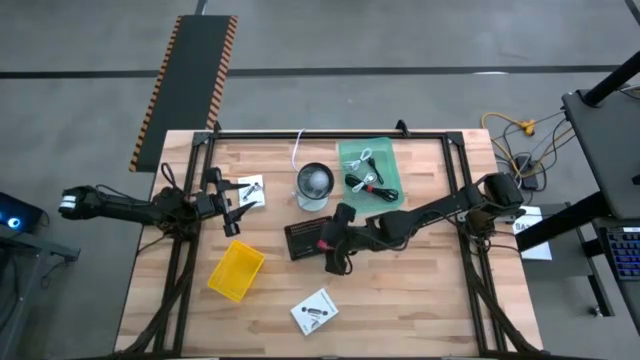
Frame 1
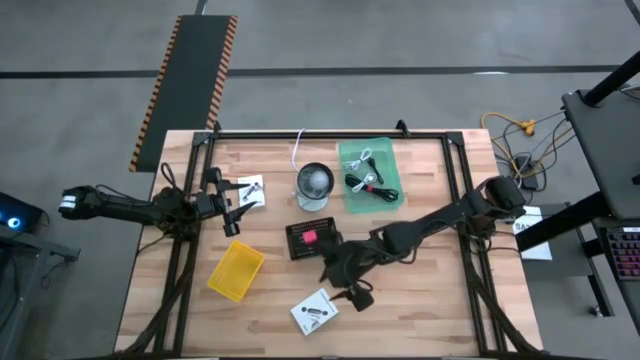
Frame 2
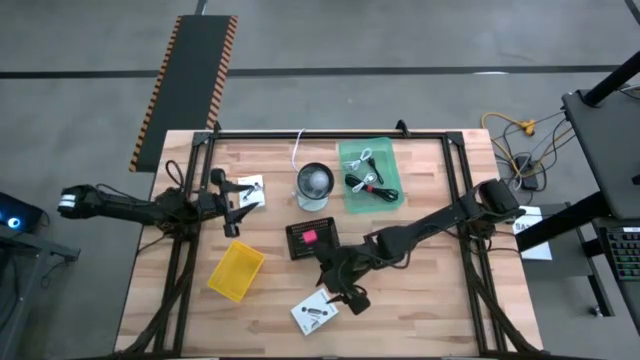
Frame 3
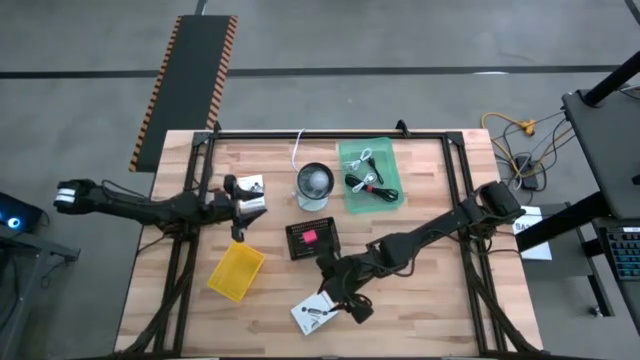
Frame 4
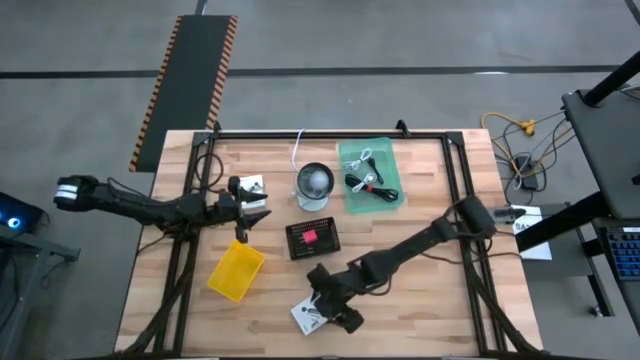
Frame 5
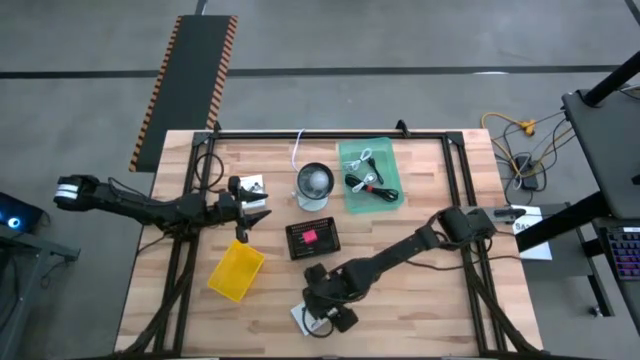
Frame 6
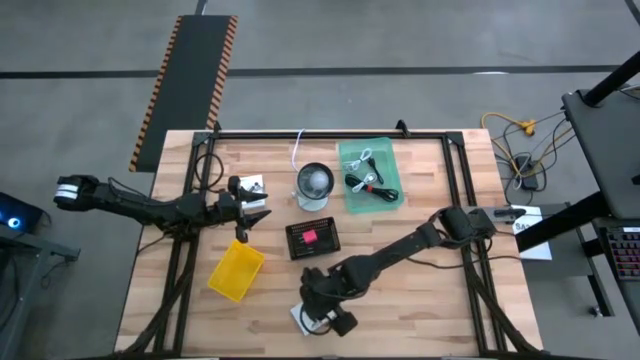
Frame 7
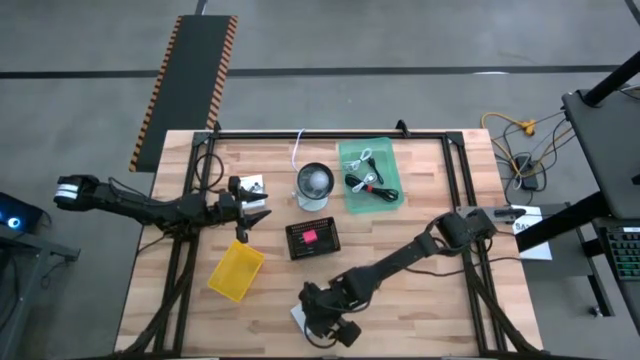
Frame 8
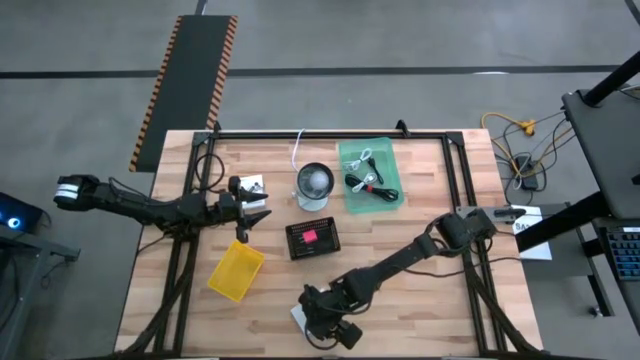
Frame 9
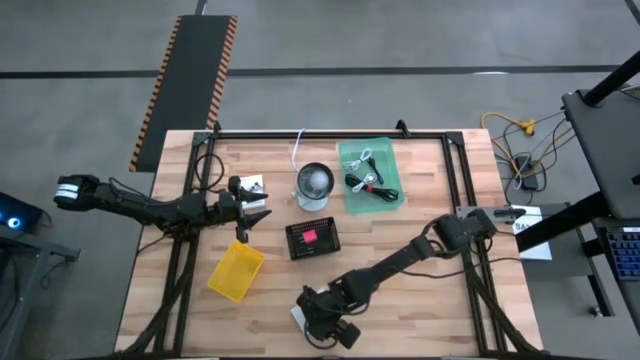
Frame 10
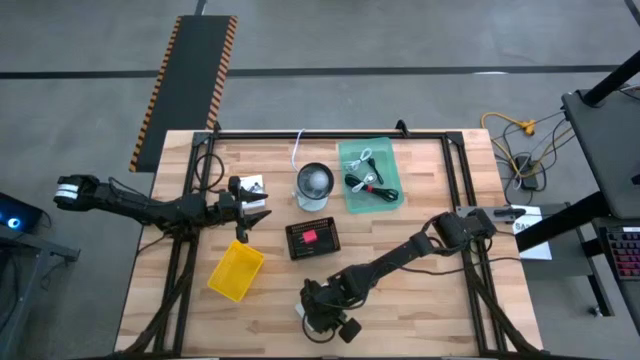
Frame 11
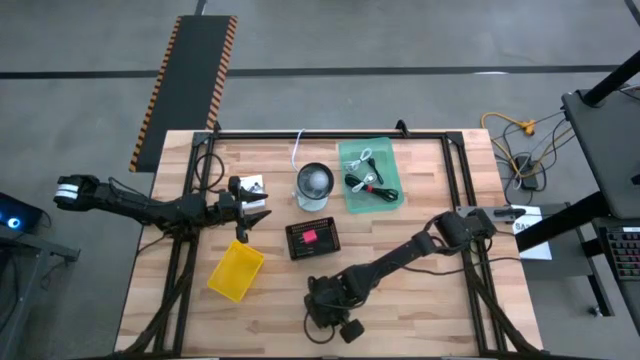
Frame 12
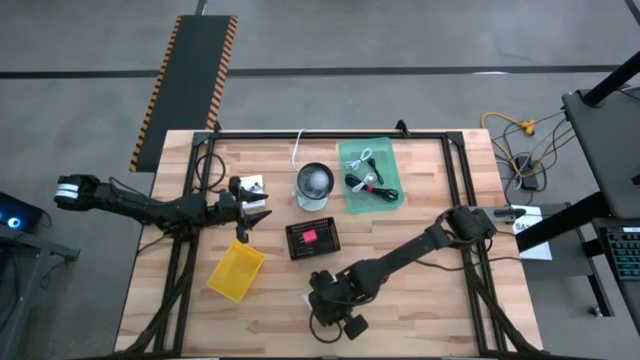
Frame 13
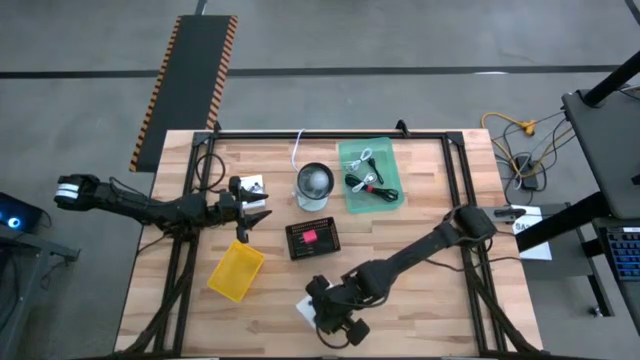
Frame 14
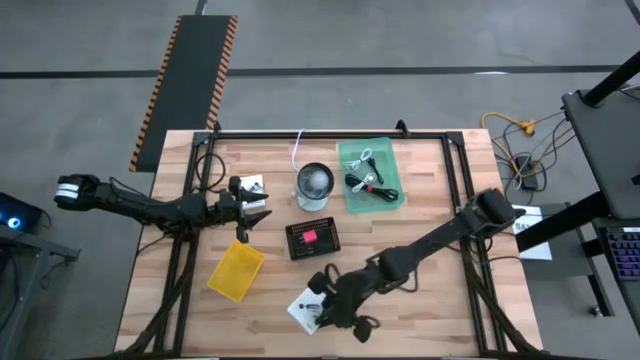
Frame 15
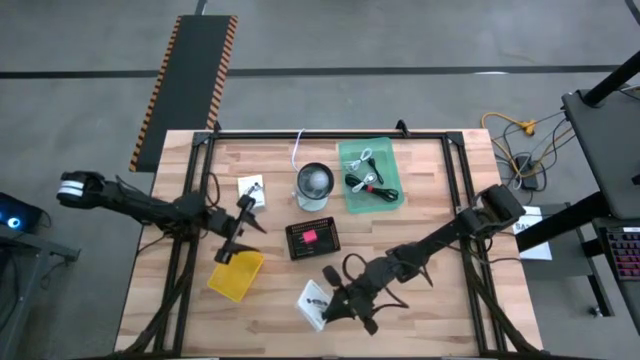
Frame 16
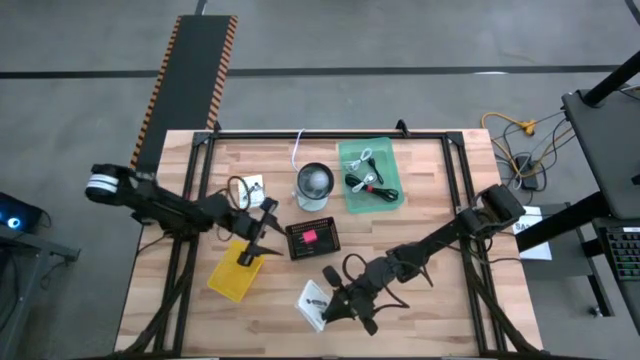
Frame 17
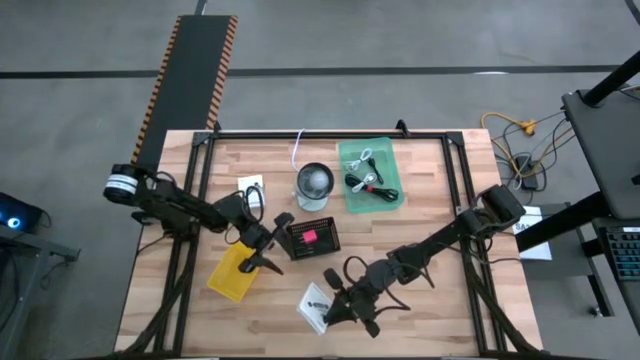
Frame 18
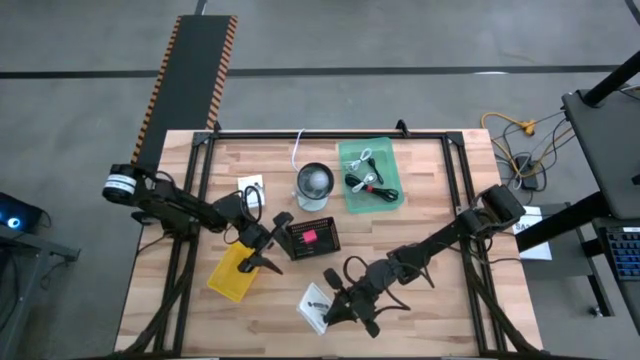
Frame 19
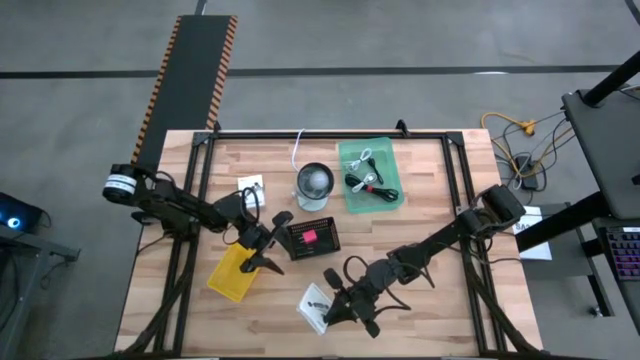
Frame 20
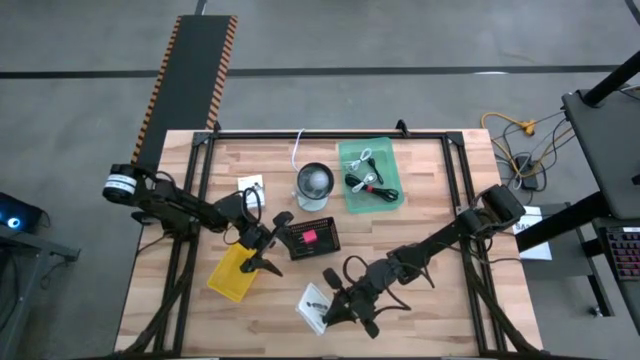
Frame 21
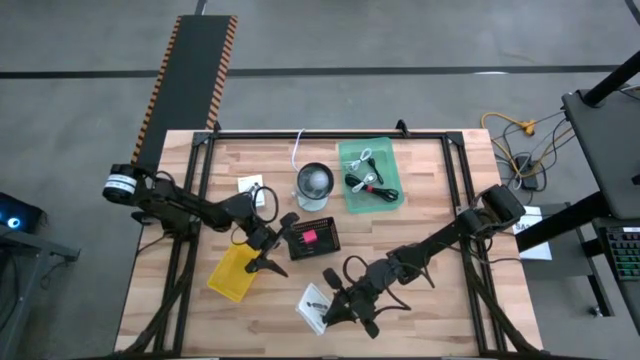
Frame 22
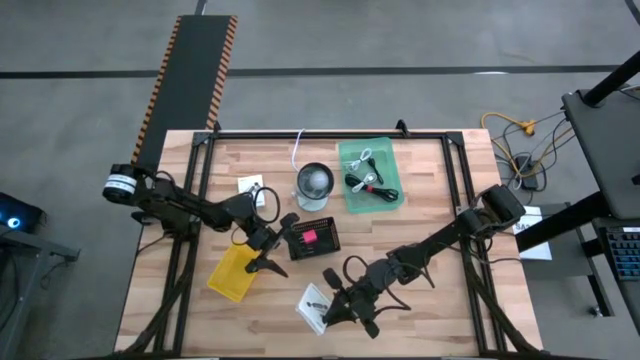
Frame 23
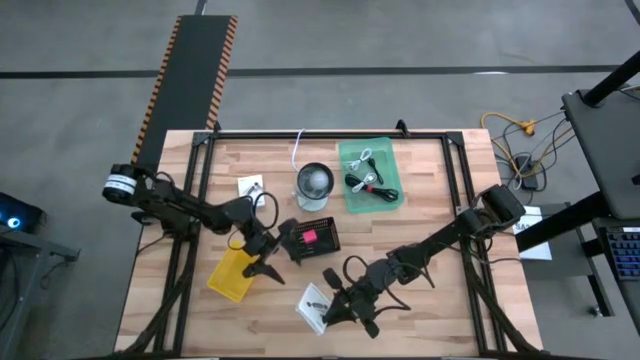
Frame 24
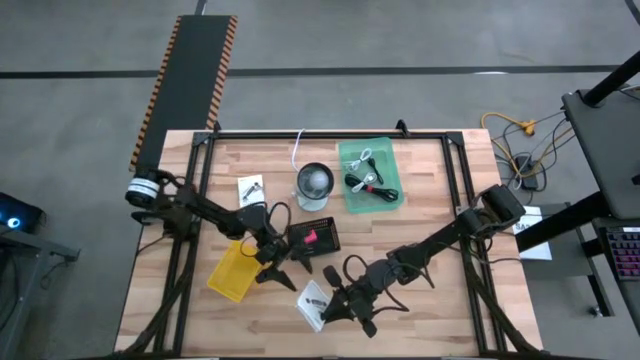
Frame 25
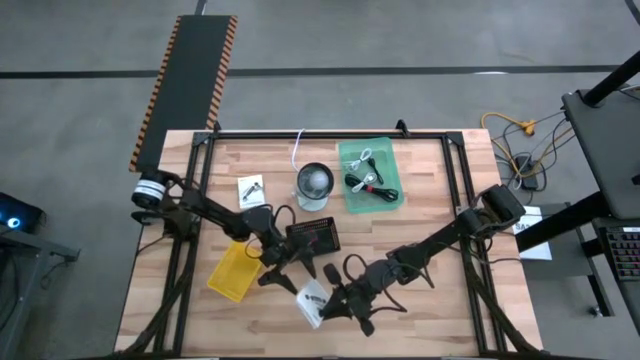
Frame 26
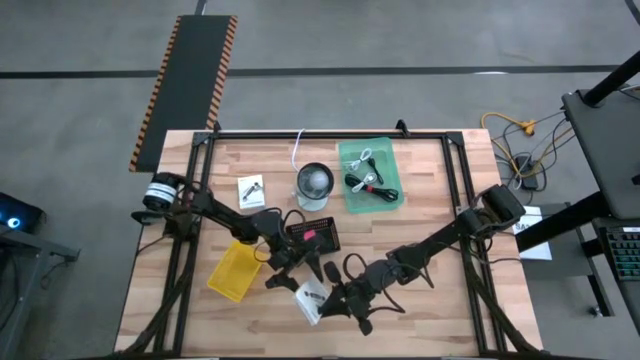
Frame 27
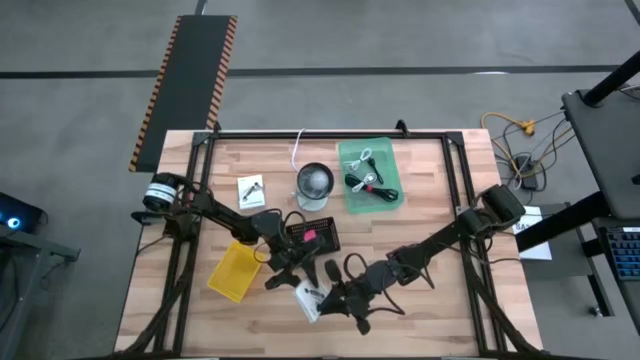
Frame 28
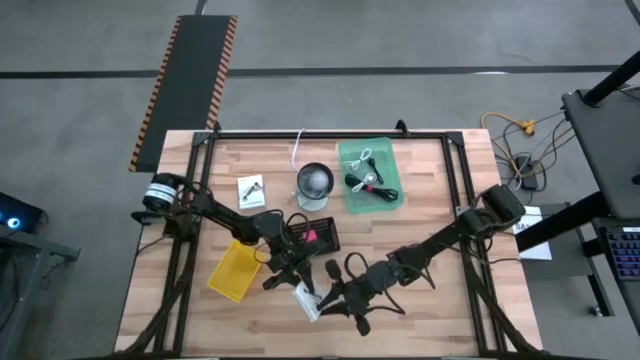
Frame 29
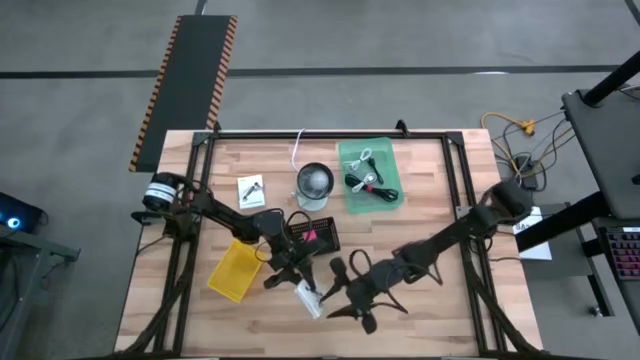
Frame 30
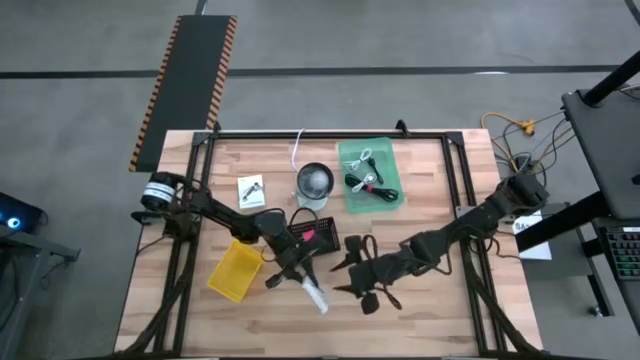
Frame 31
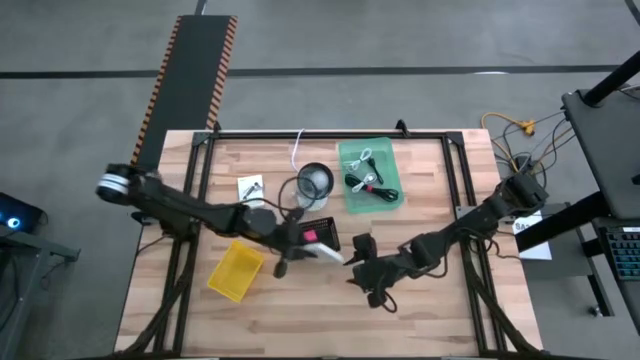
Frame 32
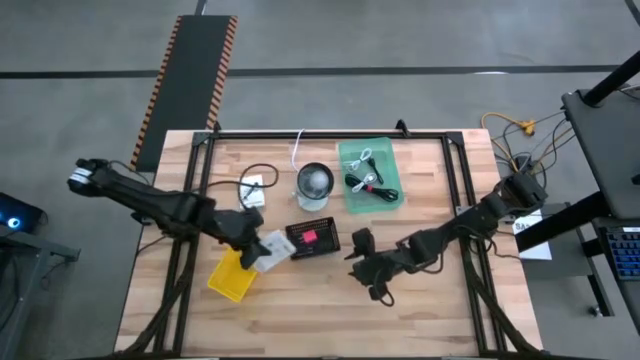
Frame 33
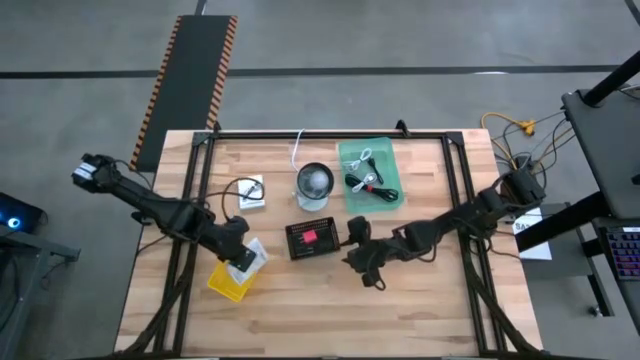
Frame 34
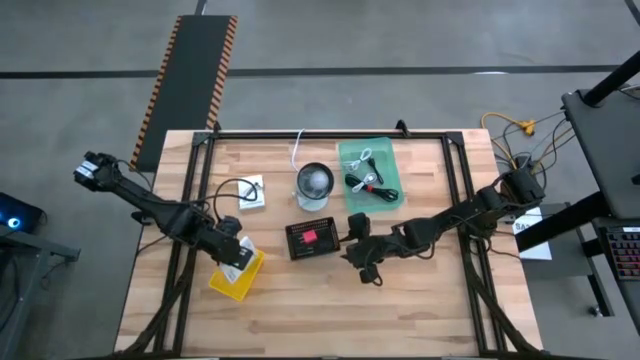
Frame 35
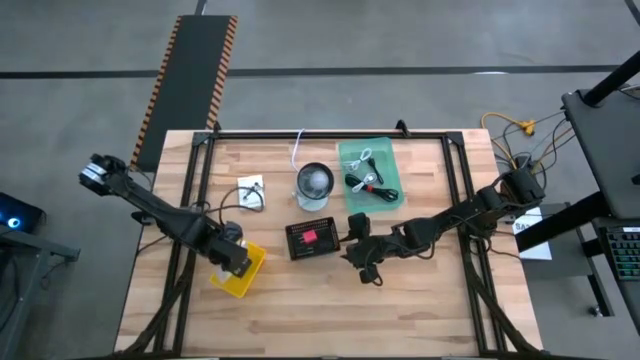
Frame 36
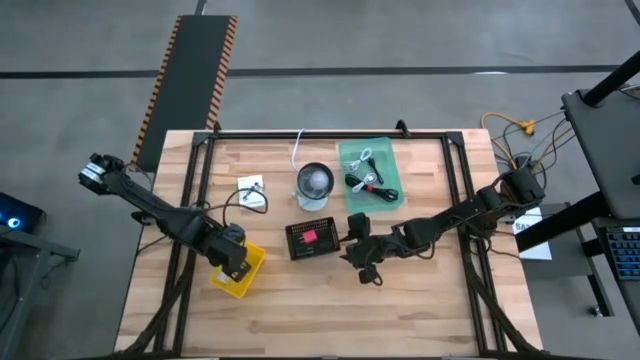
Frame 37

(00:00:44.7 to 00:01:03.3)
Task: Pick and place items into bin
Put the bottom white box into the yellow bin

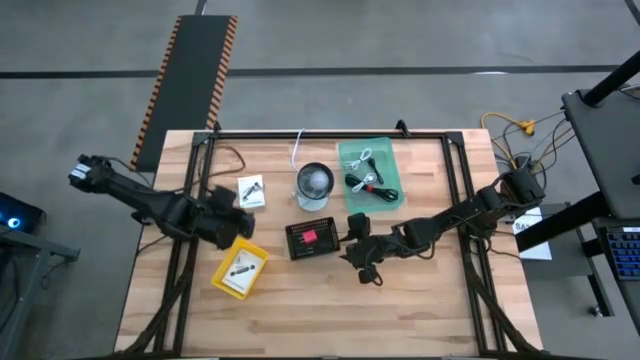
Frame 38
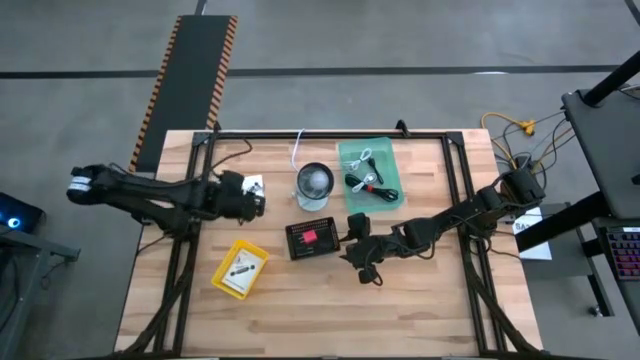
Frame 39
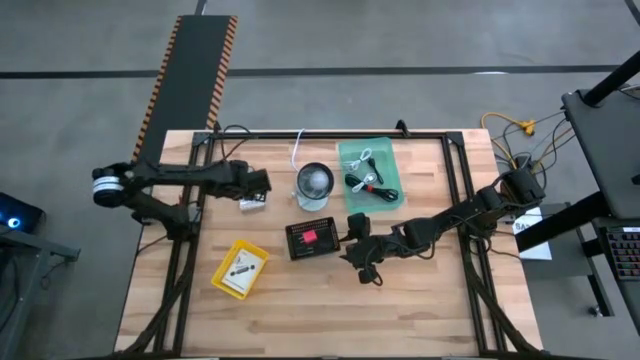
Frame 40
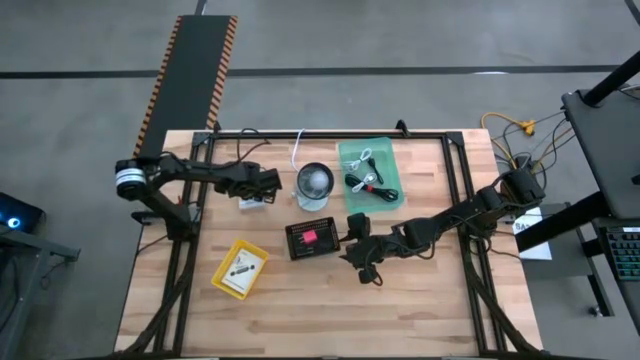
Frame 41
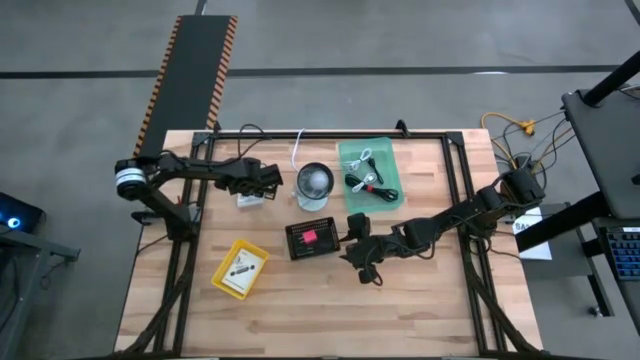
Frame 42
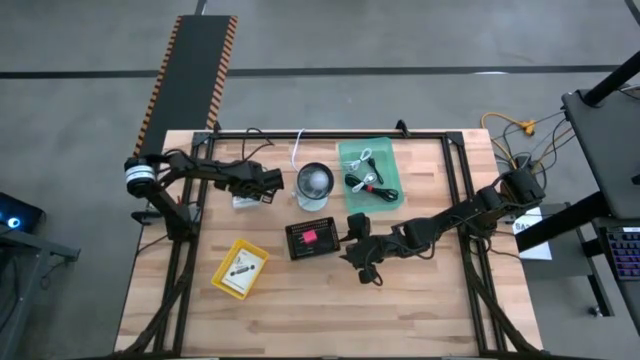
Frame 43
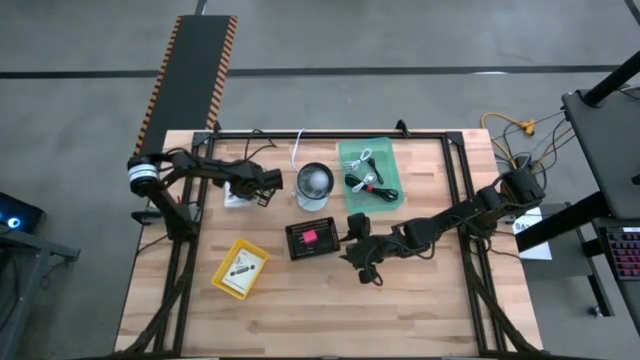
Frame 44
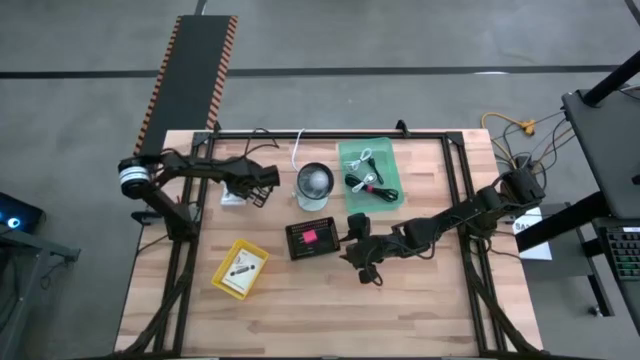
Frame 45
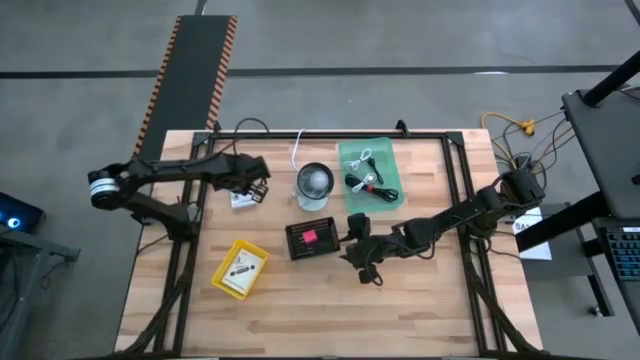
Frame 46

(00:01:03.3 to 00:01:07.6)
Put the top white box into the yellow bin
